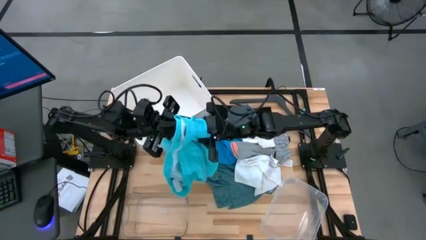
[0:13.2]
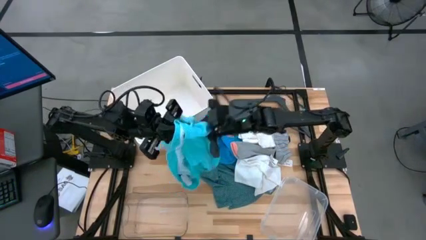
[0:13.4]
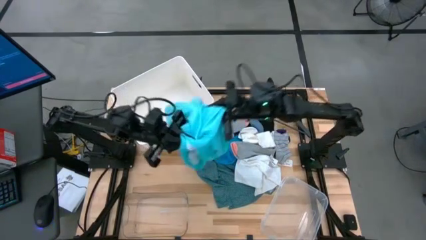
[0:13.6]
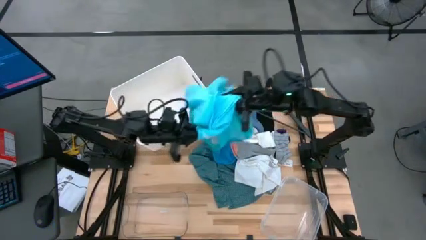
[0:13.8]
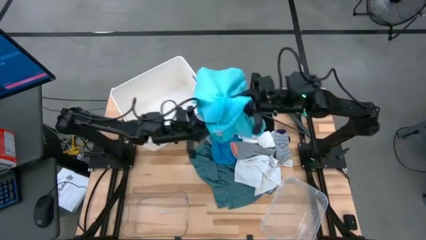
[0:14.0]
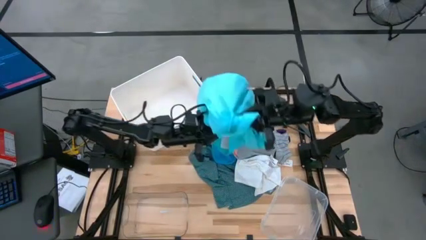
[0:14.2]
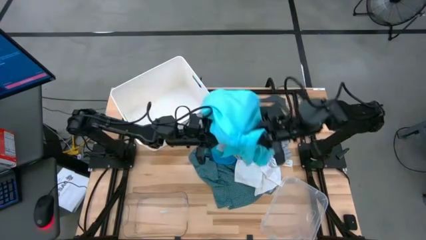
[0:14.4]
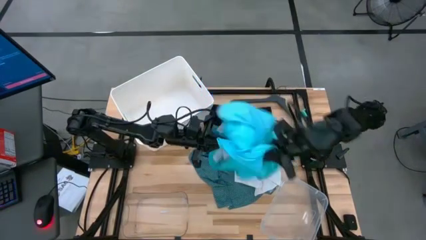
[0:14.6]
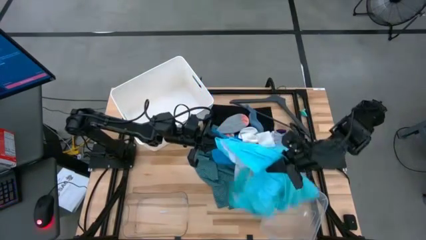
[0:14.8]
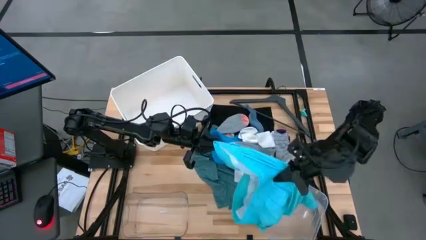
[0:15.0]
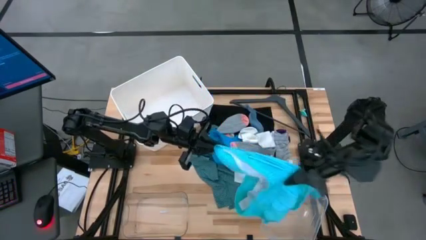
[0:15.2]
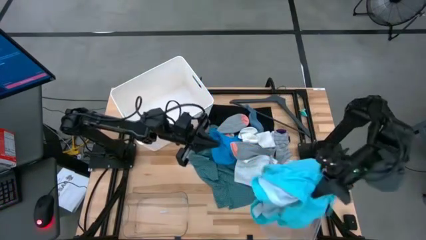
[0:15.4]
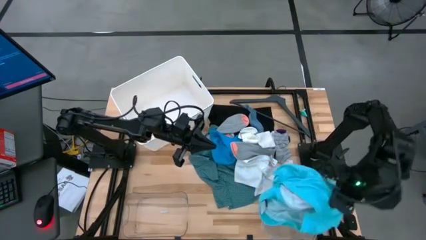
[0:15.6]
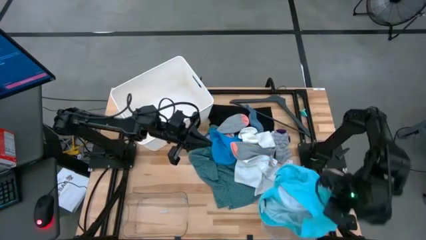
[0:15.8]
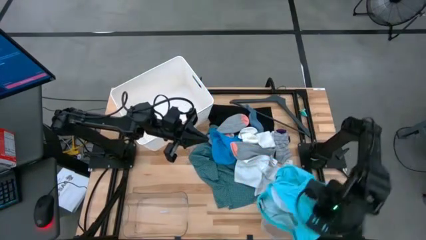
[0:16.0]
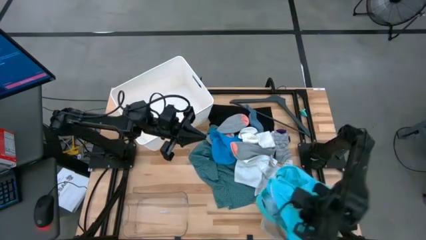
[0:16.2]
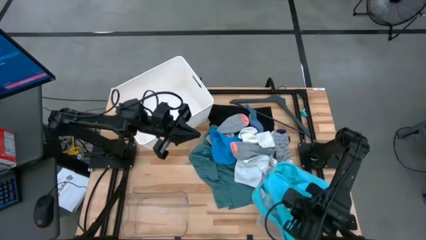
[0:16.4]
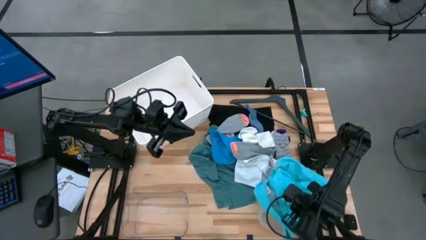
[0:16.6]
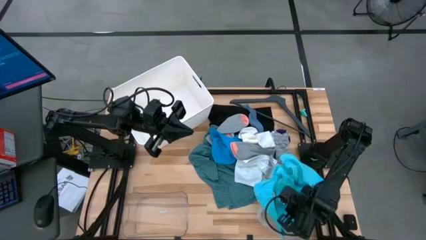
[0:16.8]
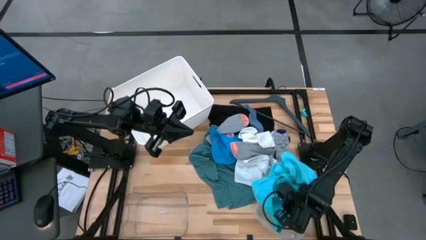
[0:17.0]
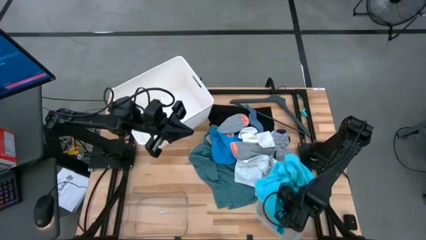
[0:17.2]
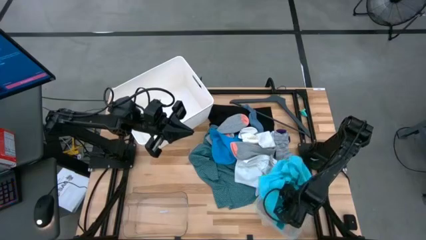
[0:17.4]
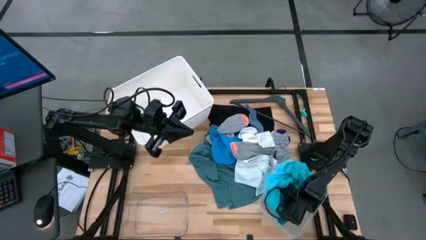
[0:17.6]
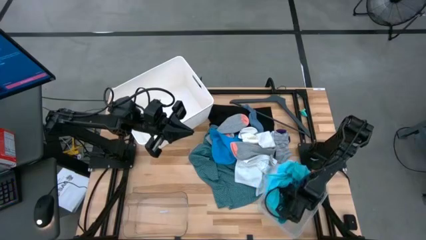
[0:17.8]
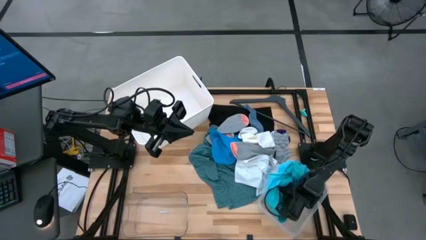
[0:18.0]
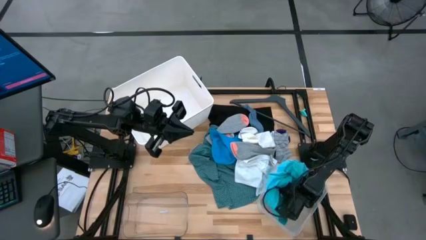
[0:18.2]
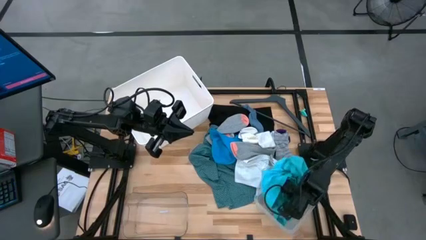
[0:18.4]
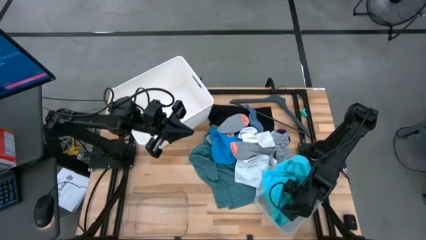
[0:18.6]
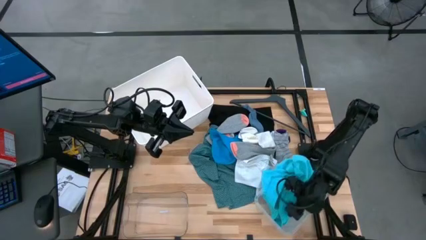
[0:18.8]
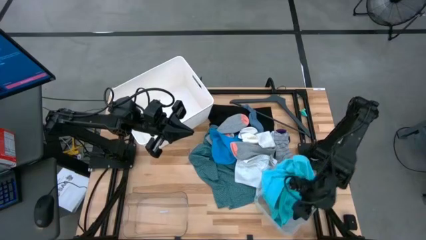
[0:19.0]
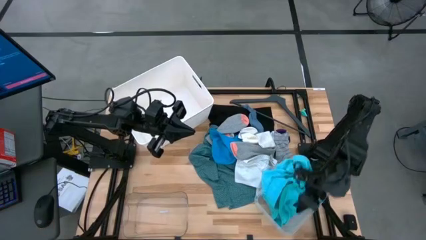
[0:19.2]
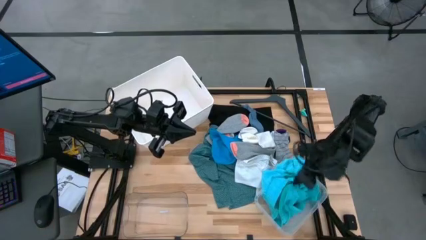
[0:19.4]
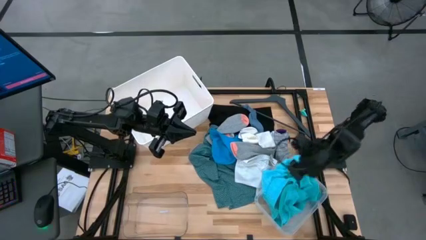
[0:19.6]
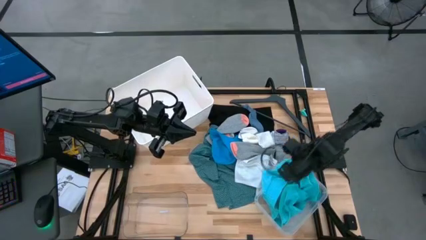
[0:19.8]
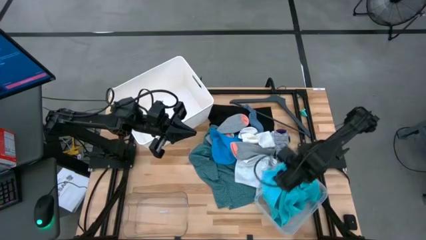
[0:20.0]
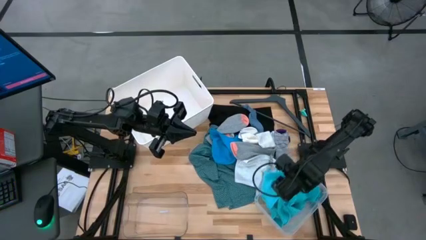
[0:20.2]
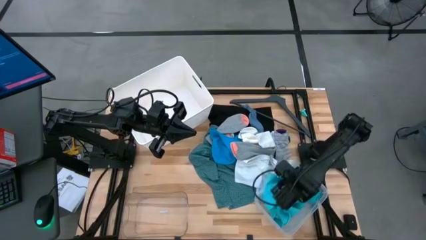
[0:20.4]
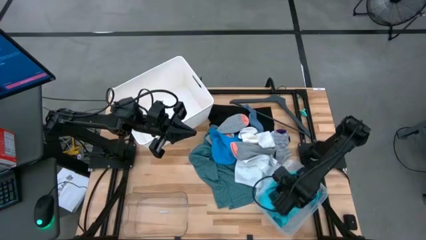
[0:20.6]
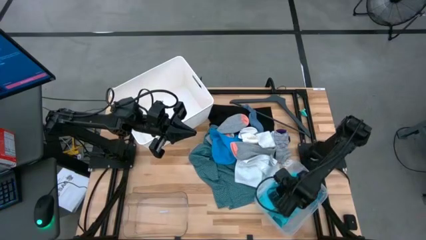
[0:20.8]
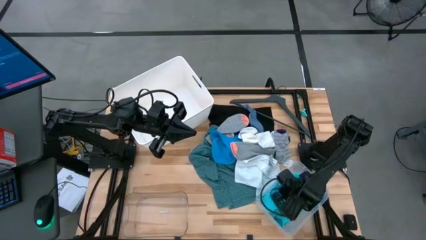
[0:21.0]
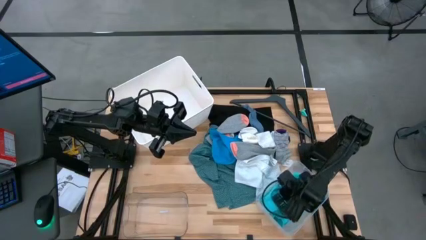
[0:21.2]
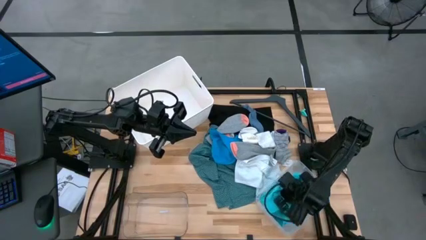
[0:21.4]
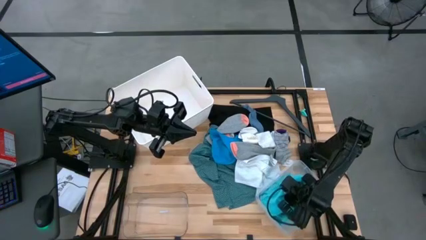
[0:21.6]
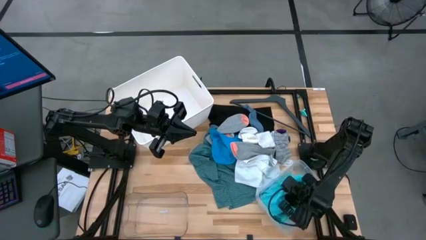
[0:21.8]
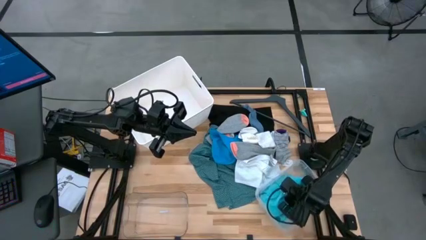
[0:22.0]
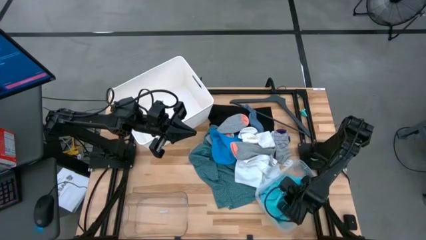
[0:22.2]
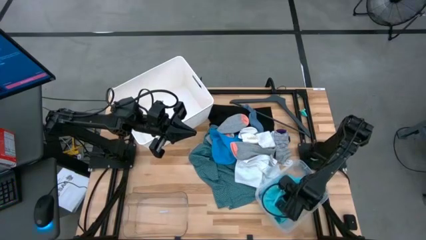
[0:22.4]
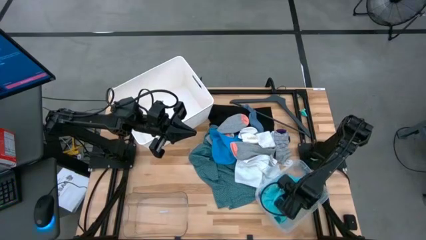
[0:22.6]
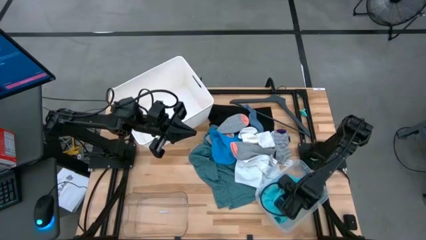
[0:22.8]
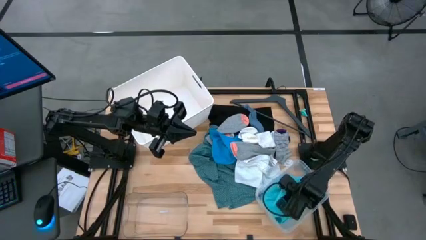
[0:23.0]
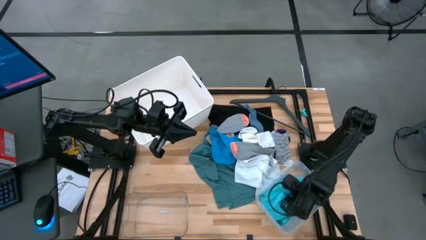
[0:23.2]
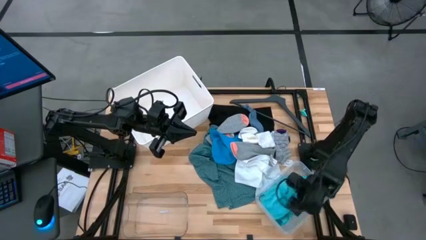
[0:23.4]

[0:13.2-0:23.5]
Task: Pick & Place Cloths
Put the green shorts into the right transparent bin

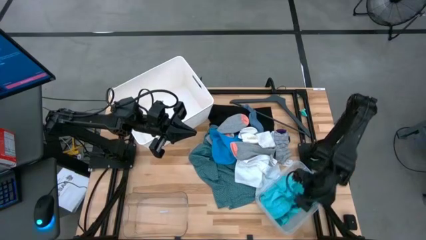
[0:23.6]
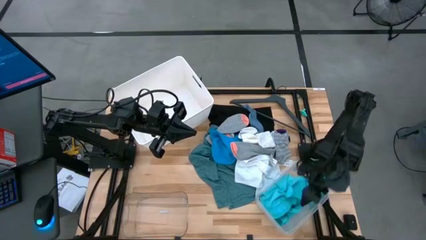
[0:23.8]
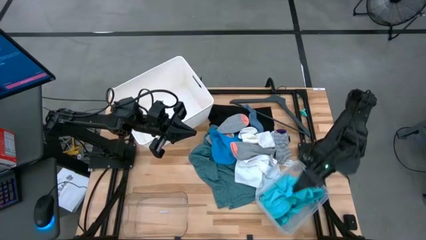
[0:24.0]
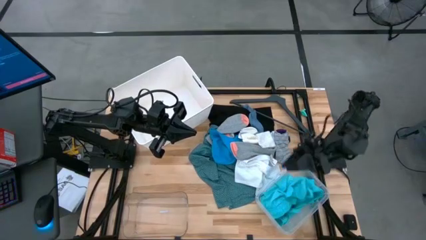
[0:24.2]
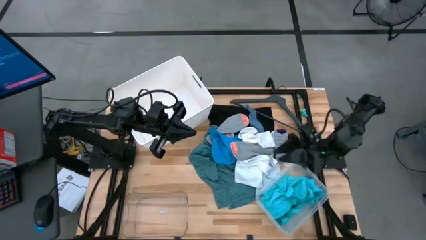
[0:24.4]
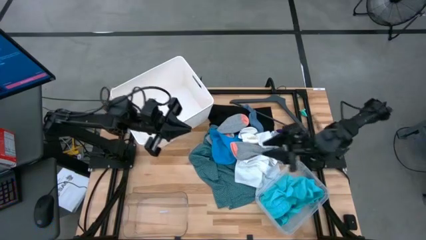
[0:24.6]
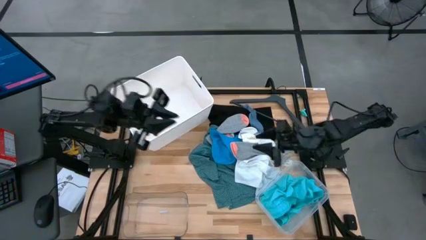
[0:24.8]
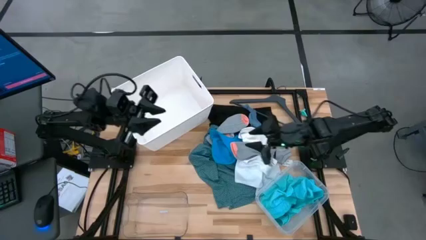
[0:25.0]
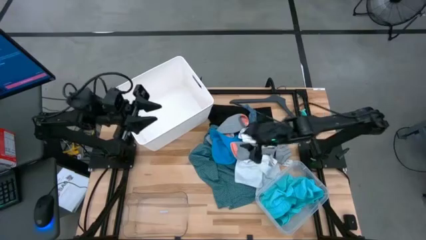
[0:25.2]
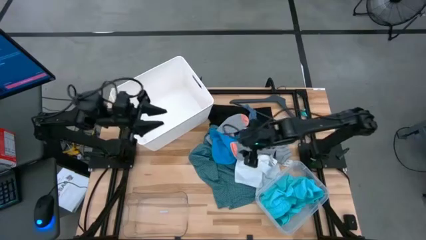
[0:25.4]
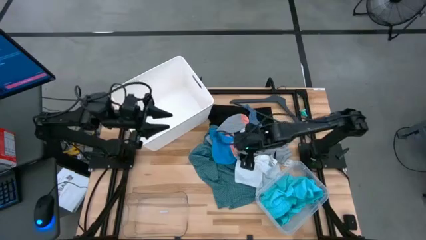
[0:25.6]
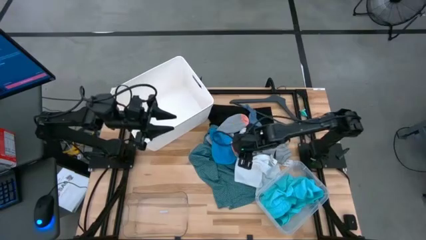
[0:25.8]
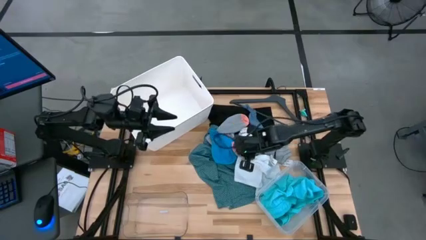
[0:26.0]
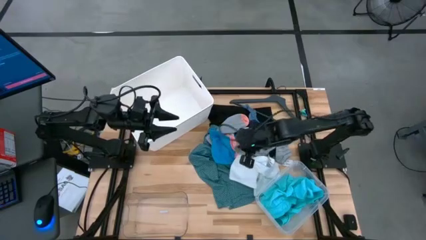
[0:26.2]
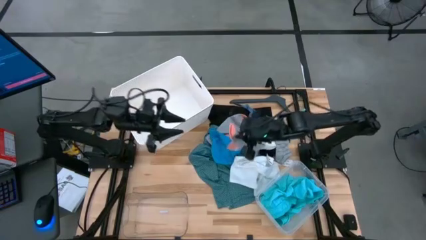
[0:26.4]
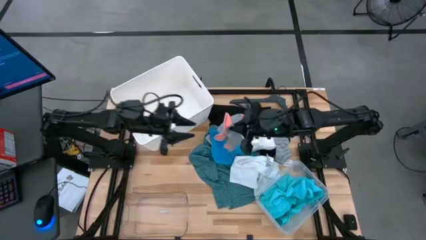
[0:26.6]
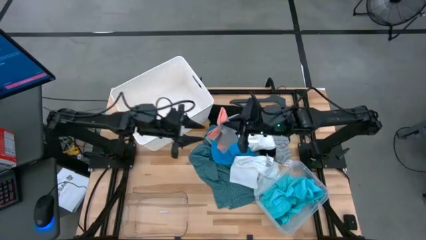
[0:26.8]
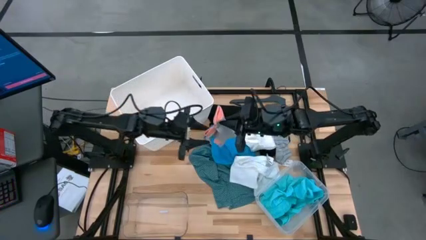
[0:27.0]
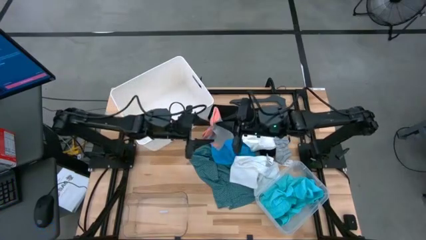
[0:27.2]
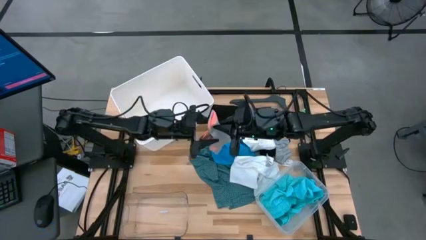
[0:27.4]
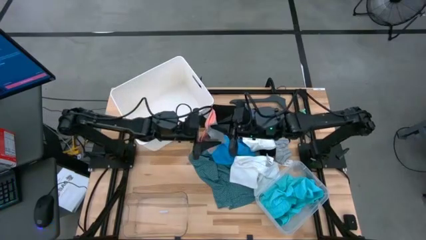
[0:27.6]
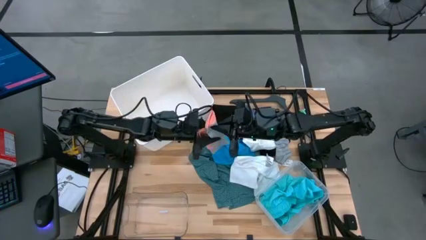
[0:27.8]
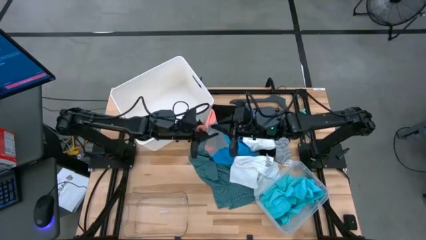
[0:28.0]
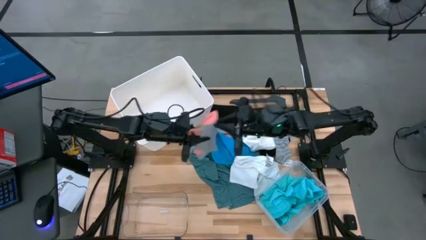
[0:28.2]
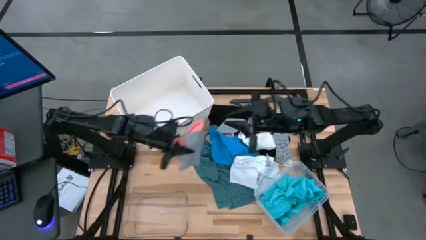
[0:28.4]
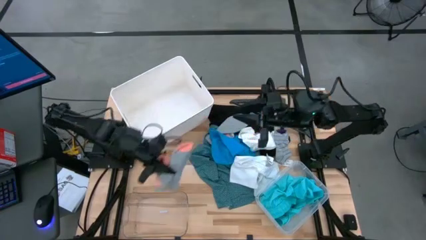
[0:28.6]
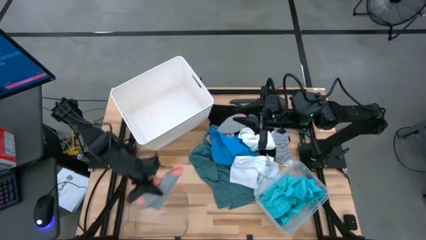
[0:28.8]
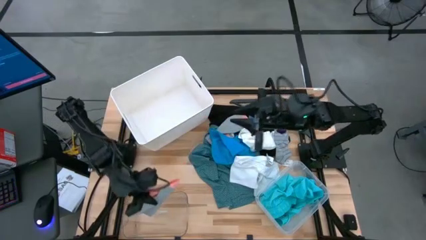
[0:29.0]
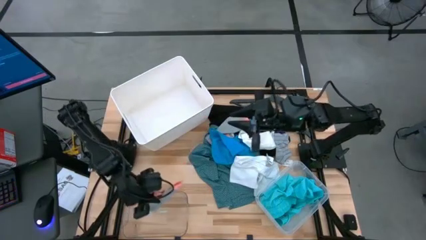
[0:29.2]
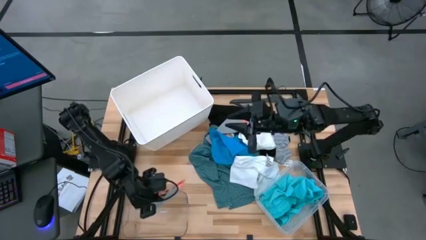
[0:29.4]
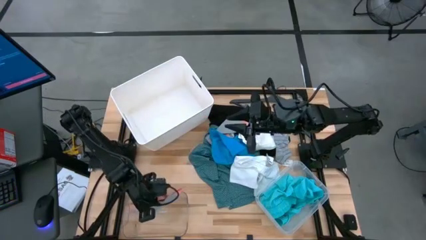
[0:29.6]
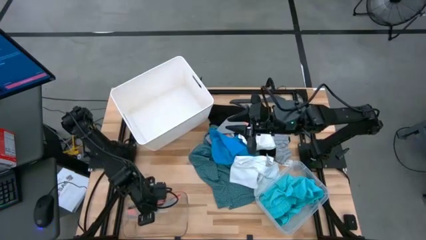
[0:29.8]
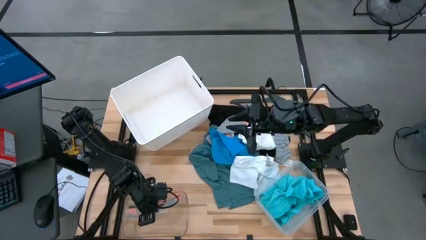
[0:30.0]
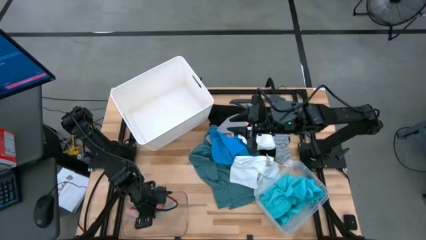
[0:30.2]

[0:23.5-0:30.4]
Put the bottom gray and pink sock into the left transparent bin
